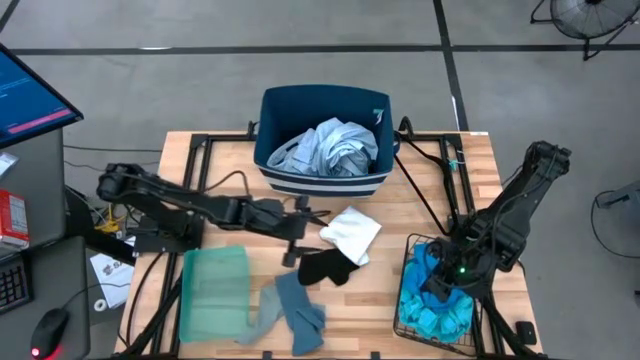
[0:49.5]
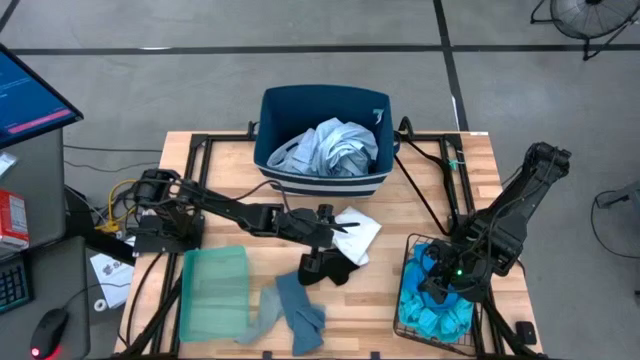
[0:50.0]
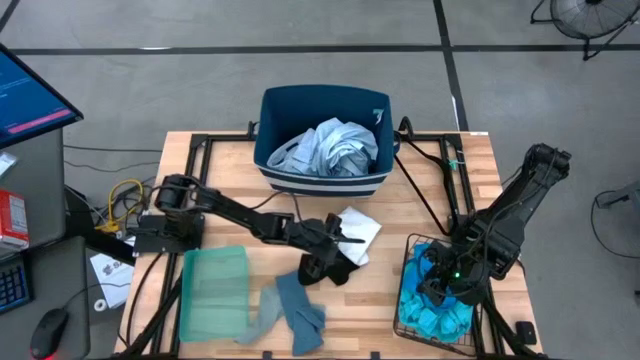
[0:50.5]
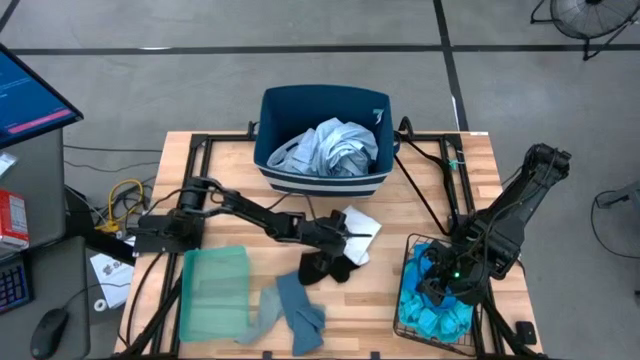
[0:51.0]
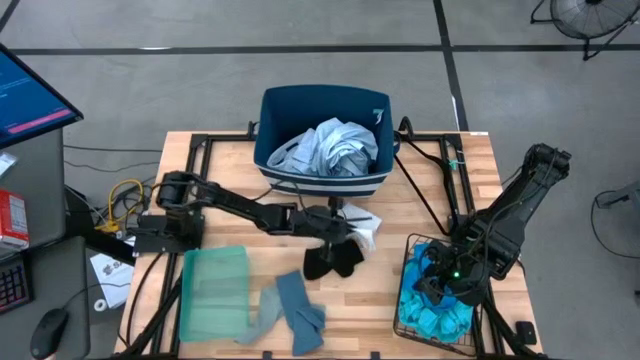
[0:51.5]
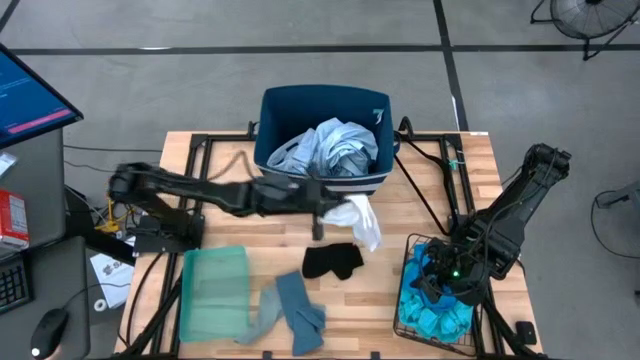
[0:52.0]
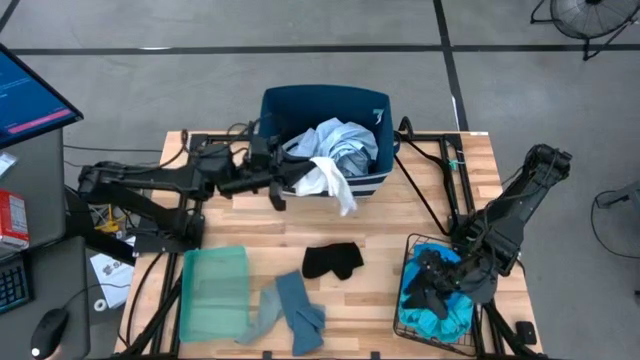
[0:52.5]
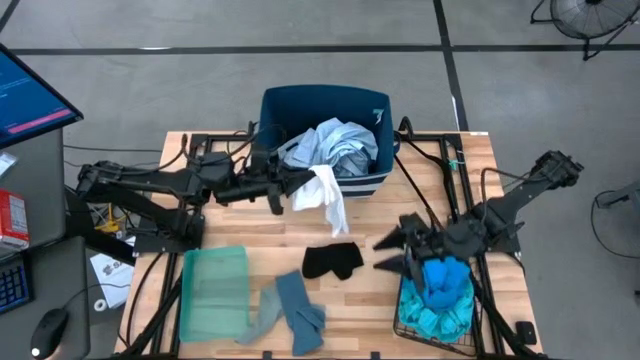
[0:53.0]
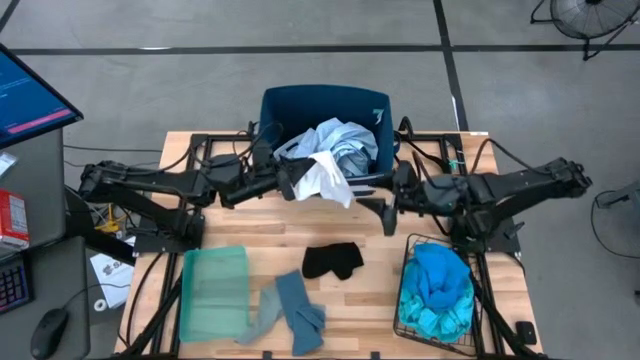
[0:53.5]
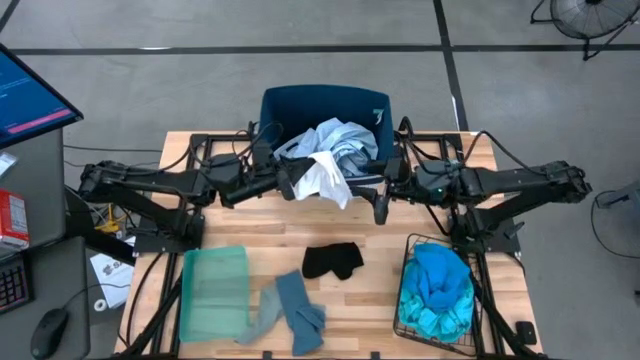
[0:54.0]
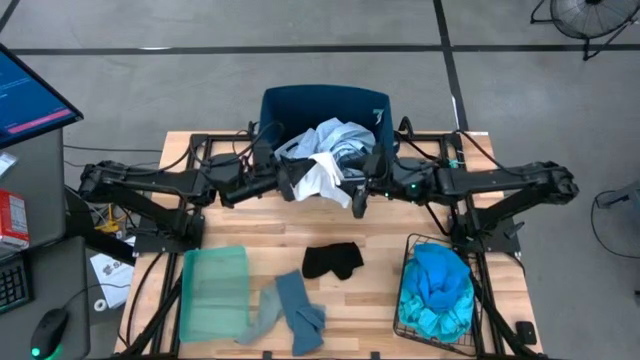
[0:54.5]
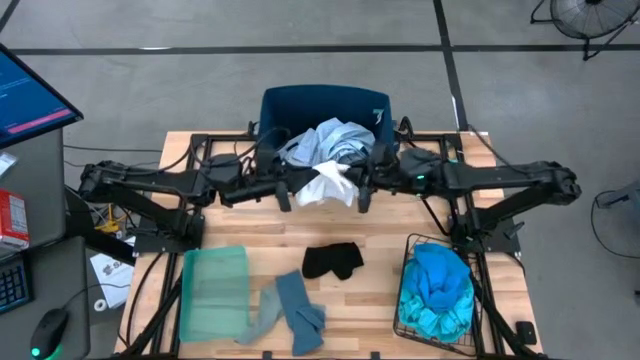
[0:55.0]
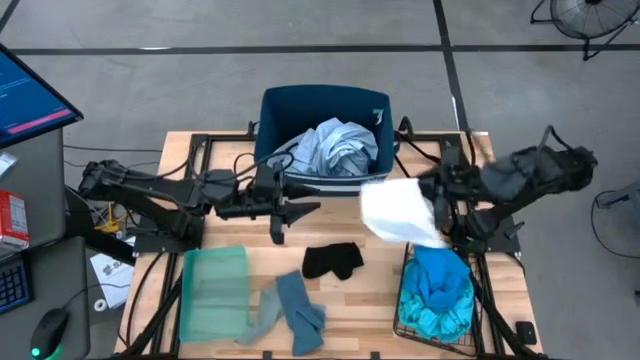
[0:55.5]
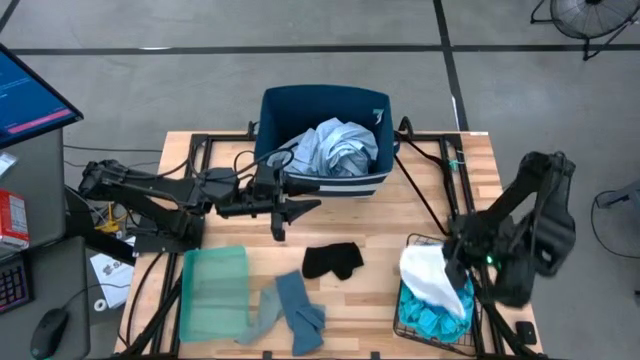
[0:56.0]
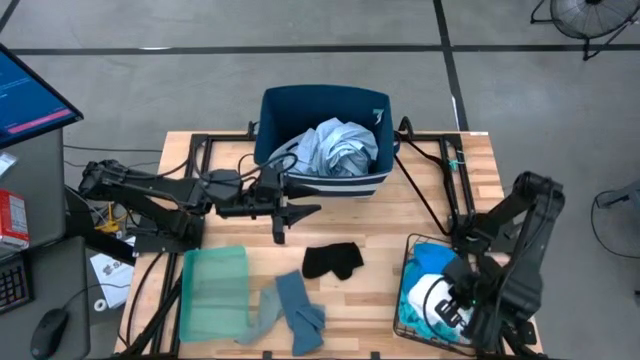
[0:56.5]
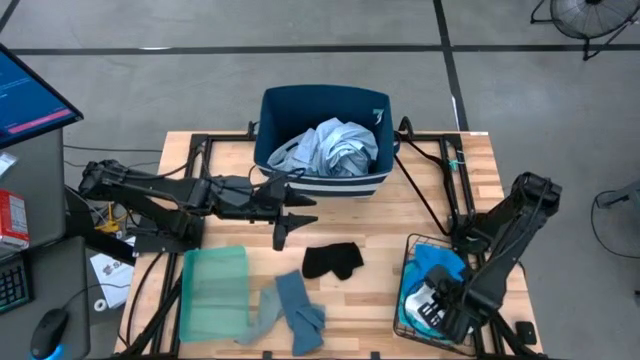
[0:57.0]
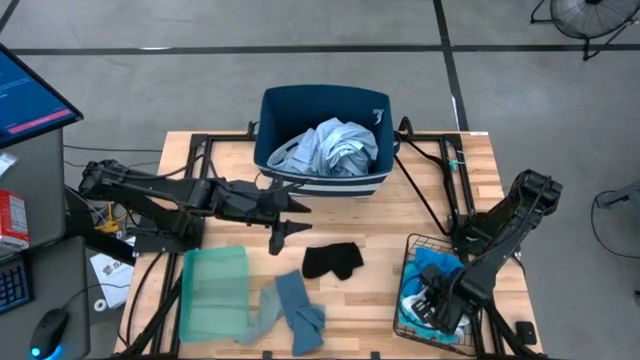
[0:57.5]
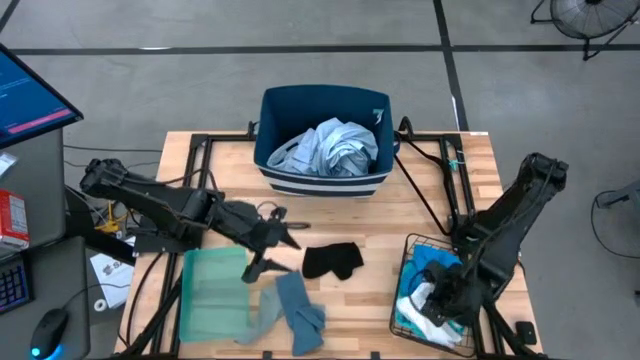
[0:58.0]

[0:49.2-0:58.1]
Task: Pick & Place Cloths
Put the white shorts into the wire basket

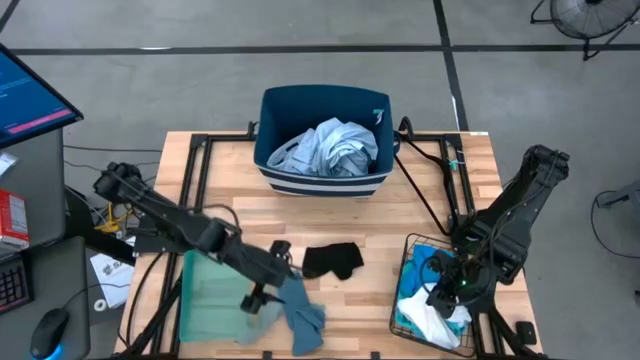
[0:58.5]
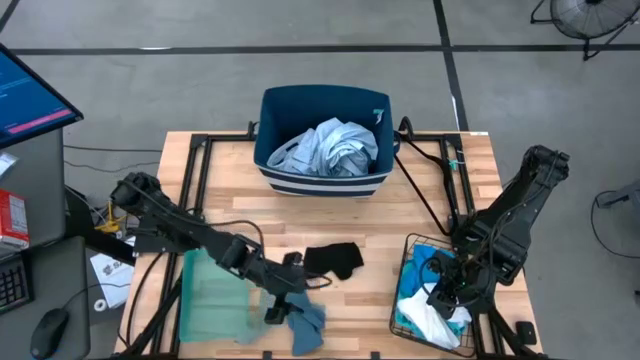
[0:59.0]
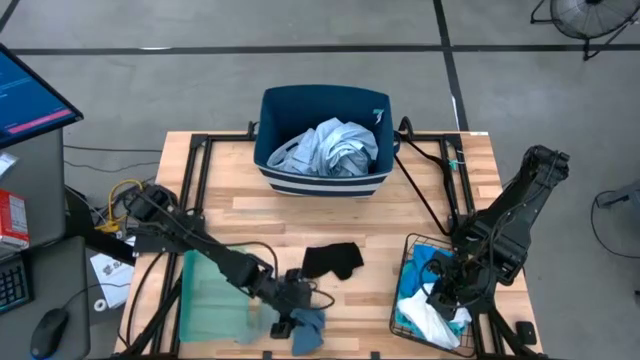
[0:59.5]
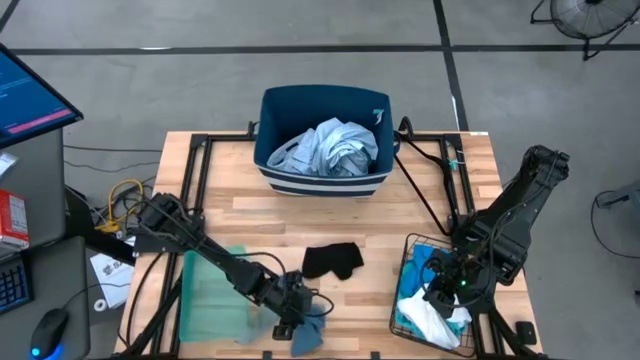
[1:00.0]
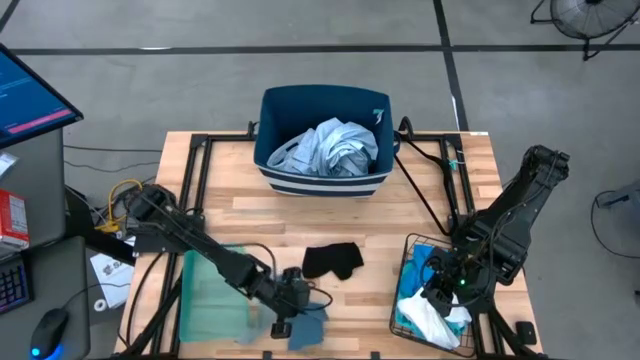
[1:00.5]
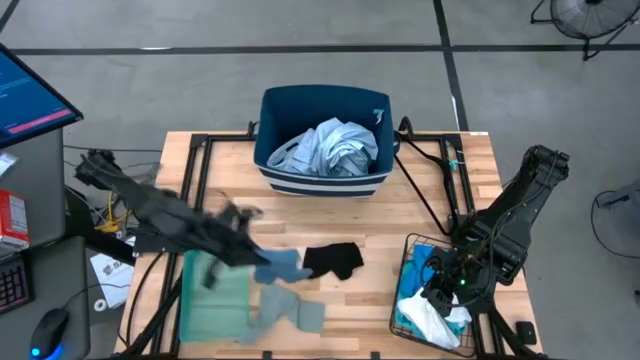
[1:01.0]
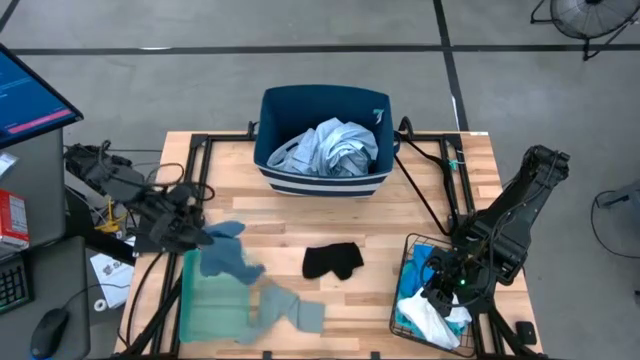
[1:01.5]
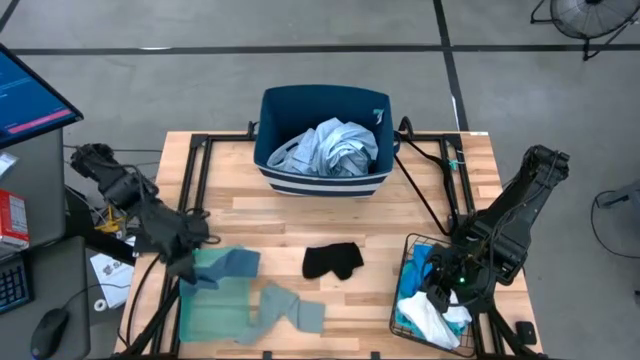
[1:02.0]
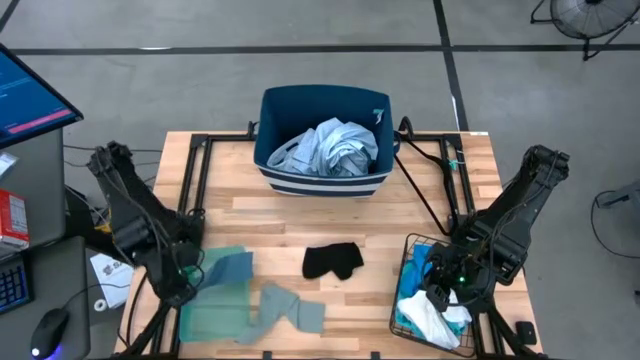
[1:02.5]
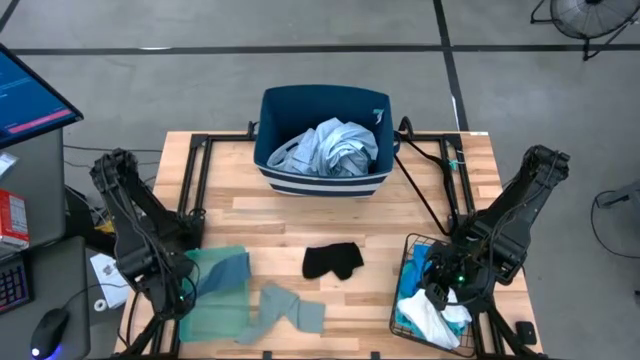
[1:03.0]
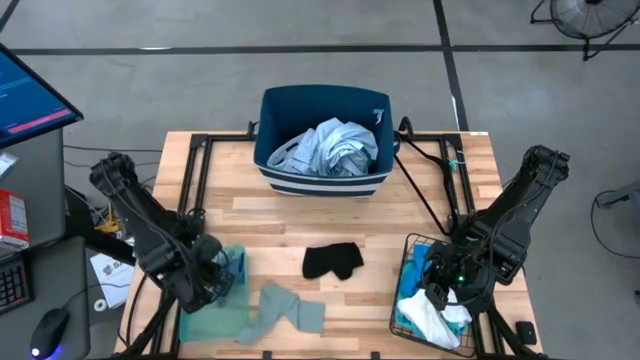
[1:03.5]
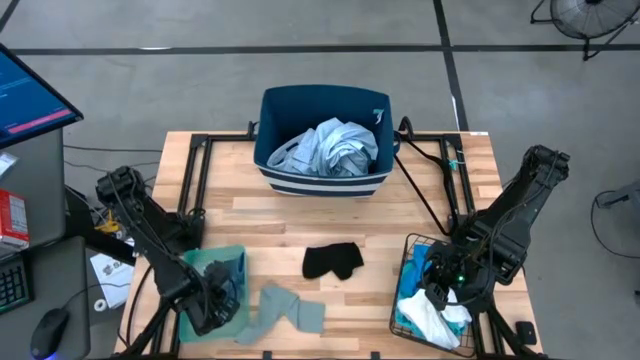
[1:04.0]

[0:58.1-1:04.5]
Put the blue sock into the green bin

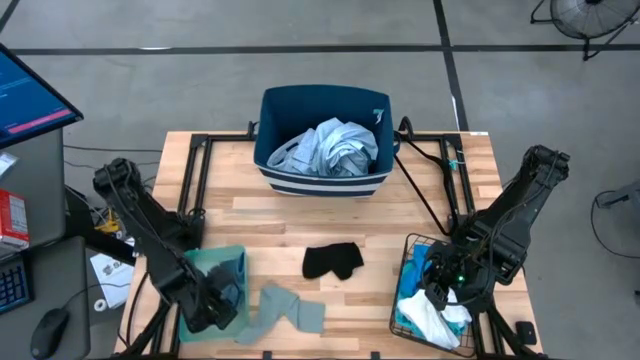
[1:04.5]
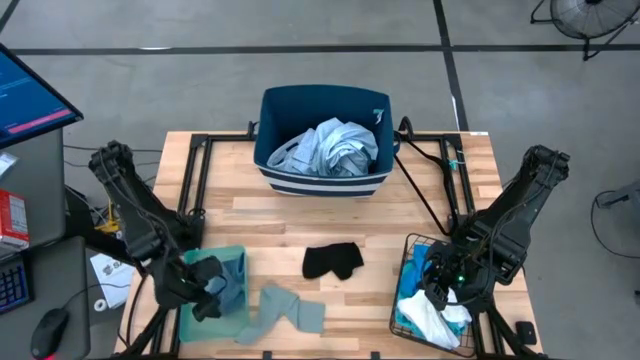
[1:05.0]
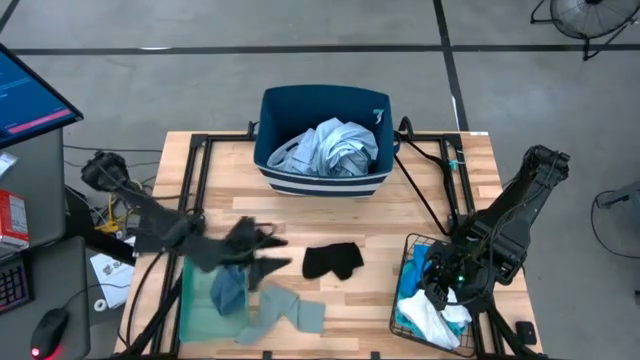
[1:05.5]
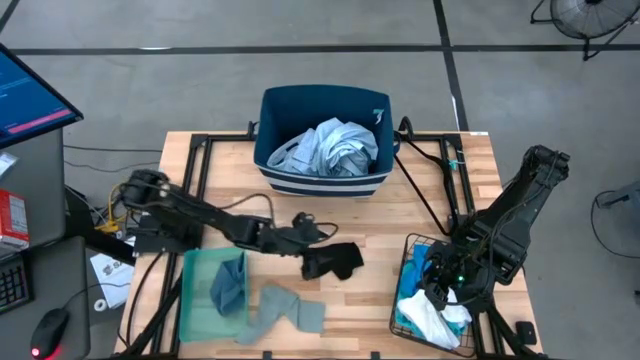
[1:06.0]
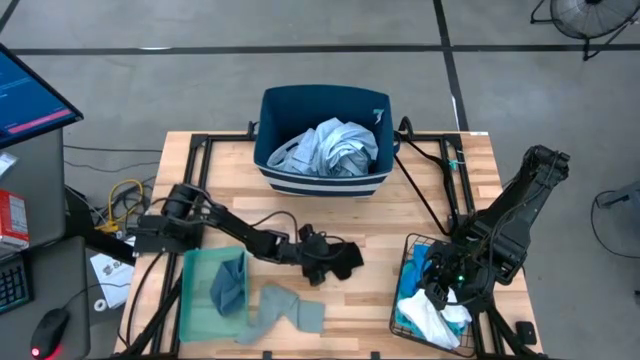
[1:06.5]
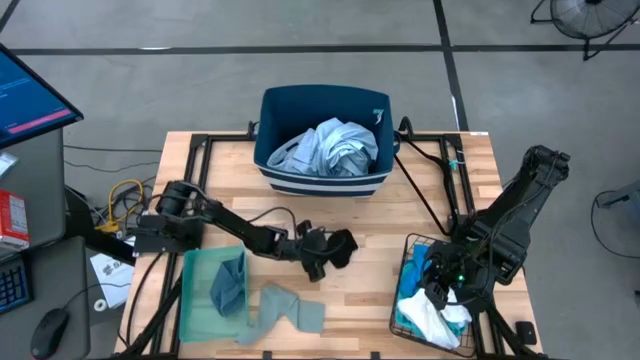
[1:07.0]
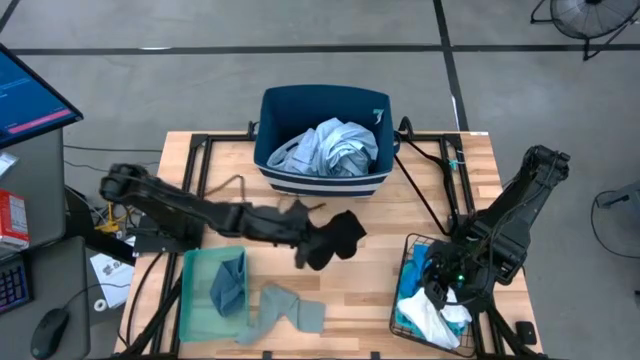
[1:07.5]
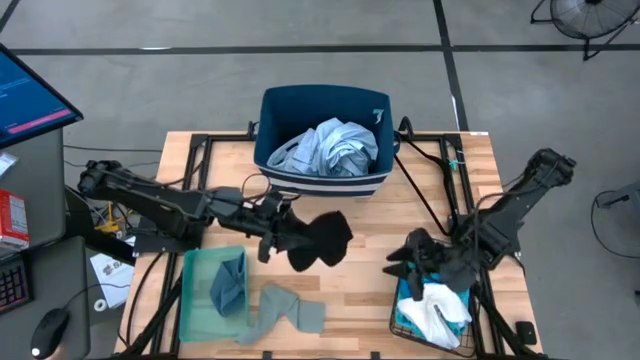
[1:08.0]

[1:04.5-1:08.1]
Put the black sock into the green bin

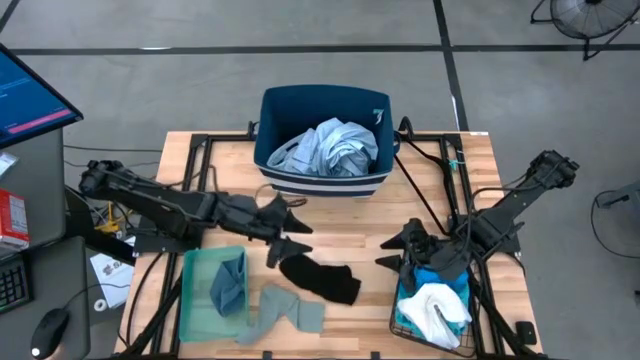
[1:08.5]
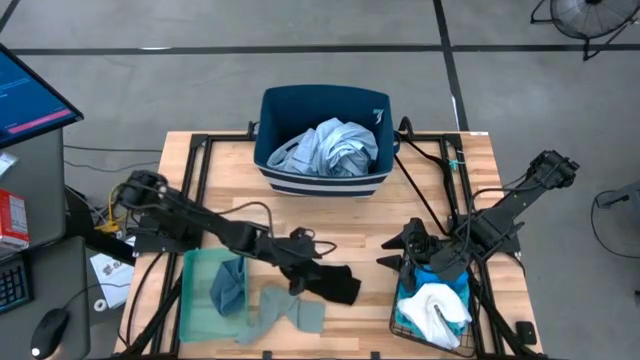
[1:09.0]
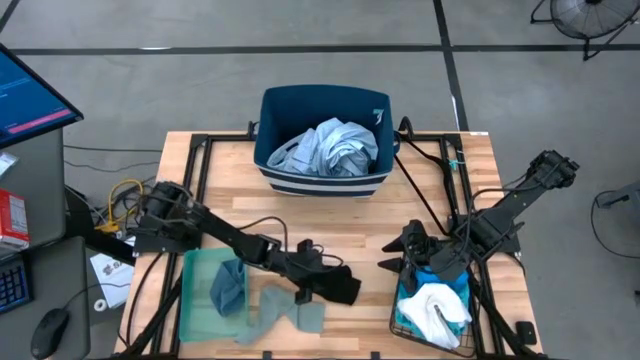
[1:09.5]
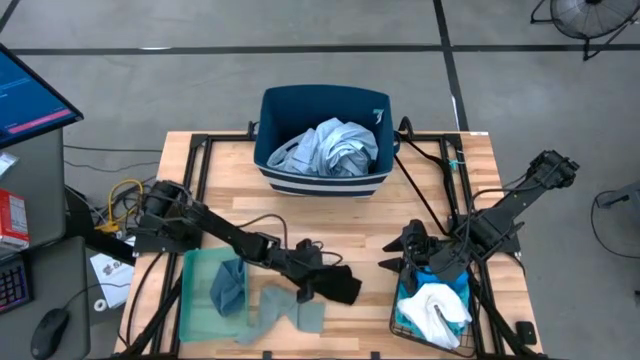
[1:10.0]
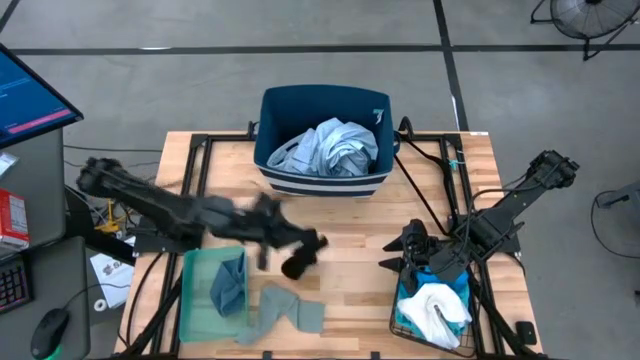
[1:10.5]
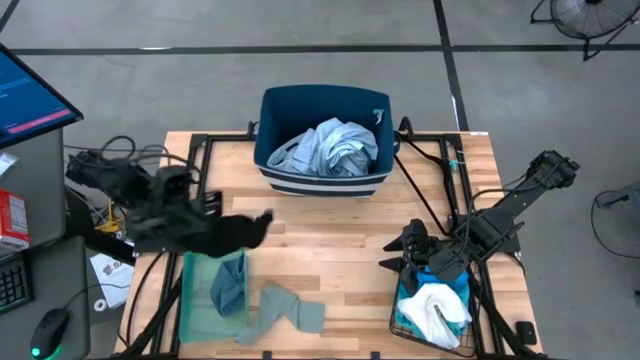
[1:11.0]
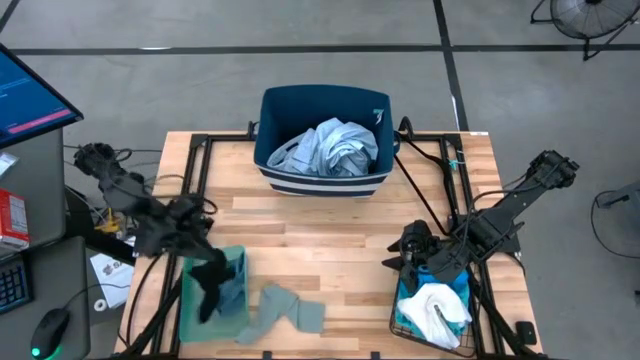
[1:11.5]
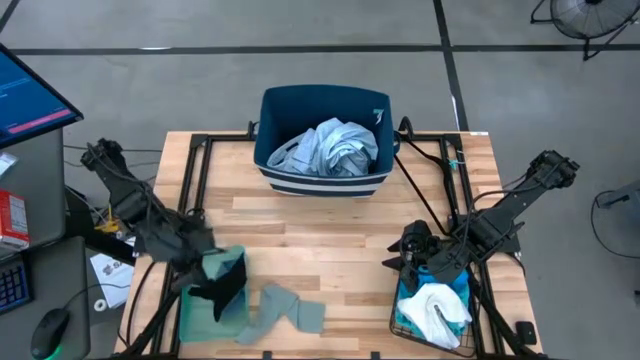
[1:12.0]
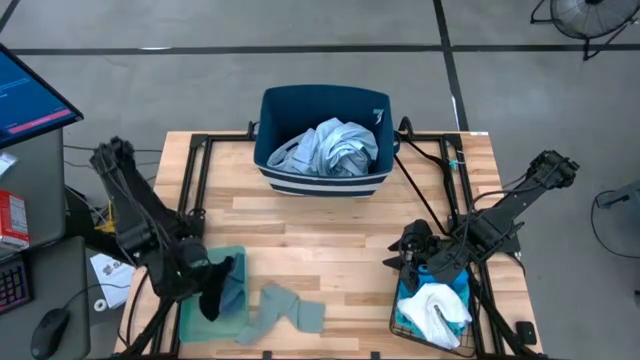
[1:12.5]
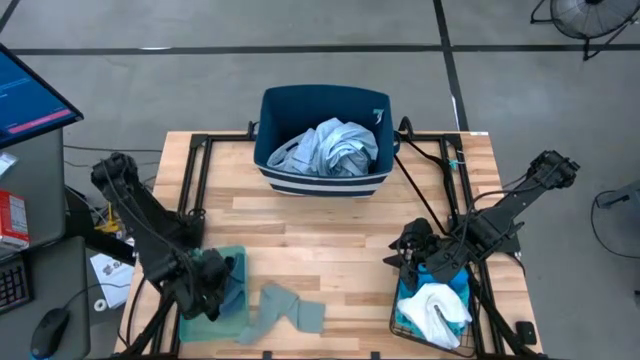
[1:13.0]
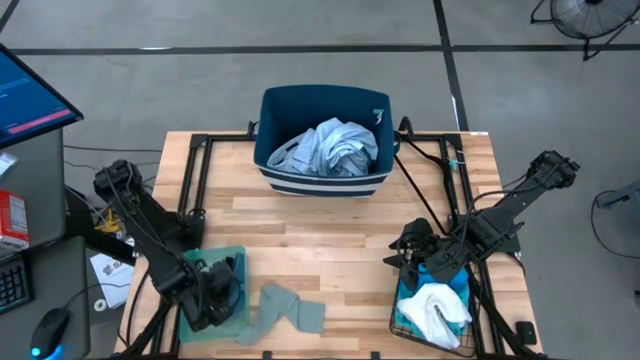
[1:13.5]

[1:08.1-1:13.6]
Put the black sock into the green bin
